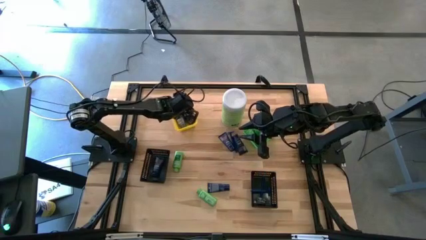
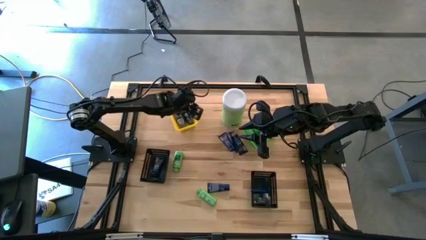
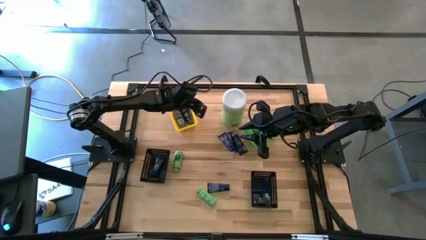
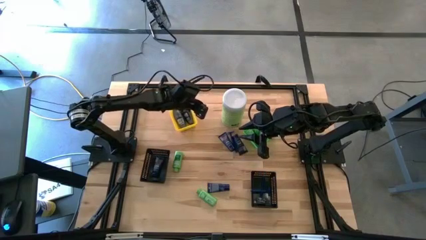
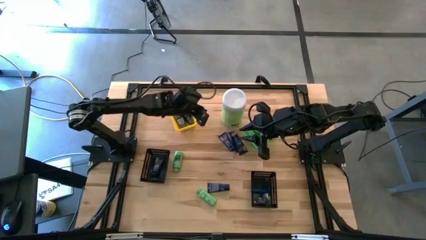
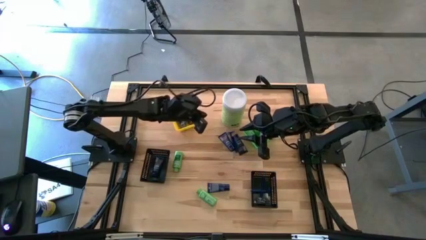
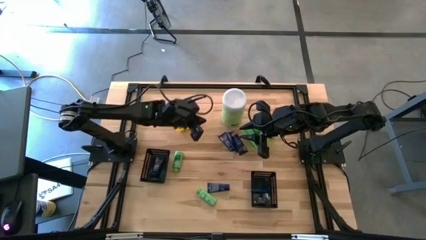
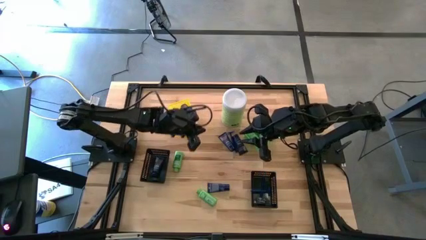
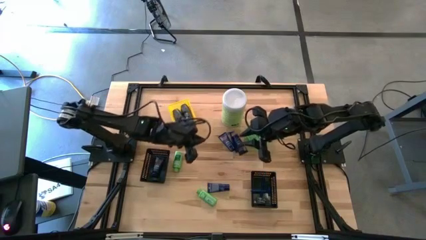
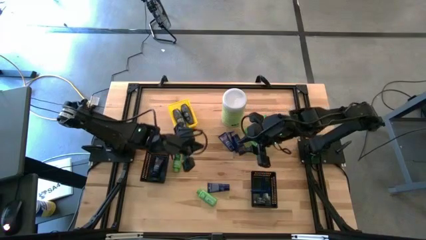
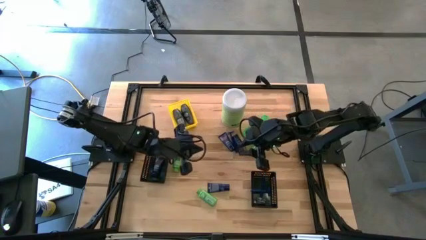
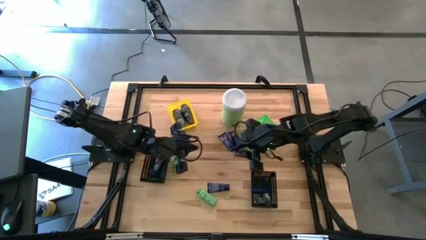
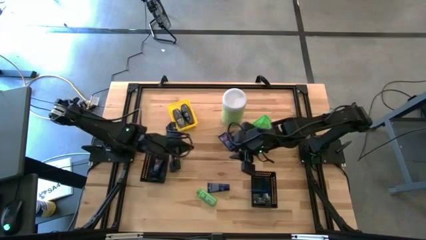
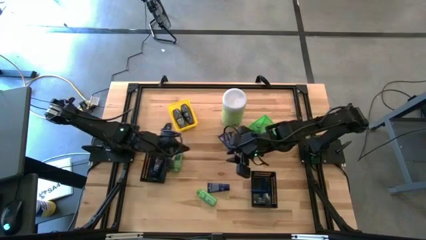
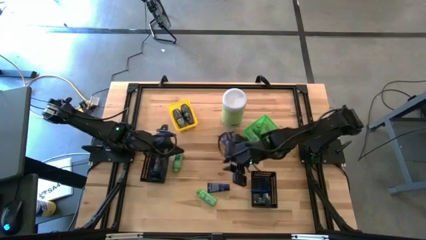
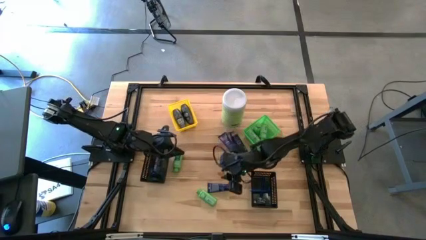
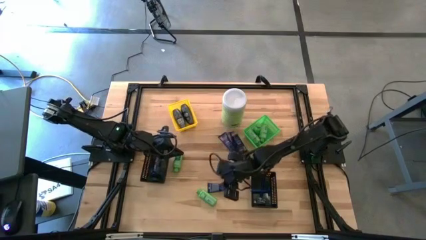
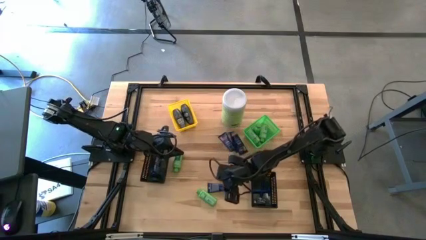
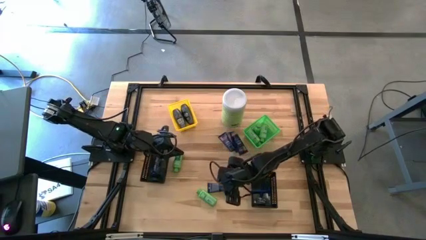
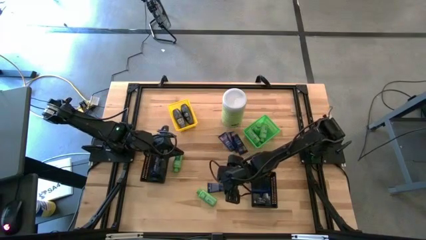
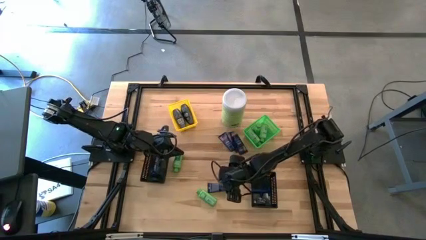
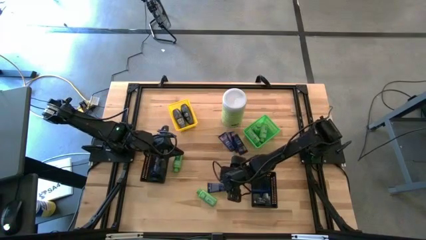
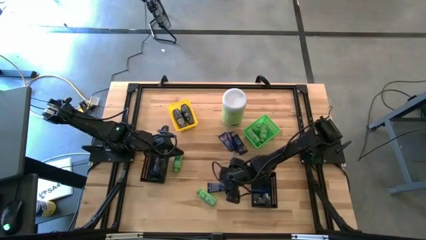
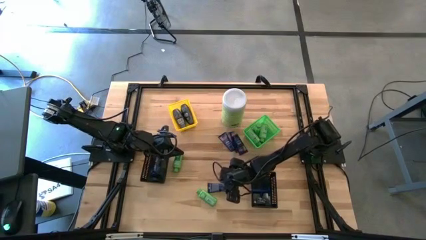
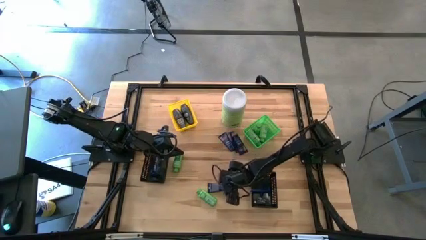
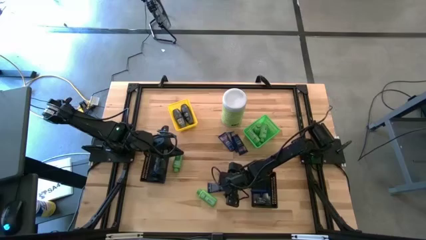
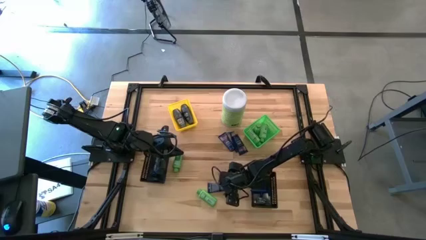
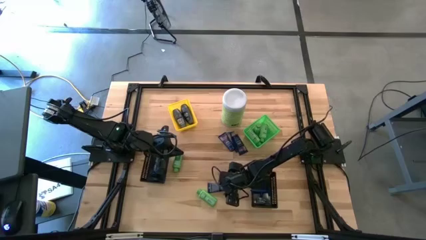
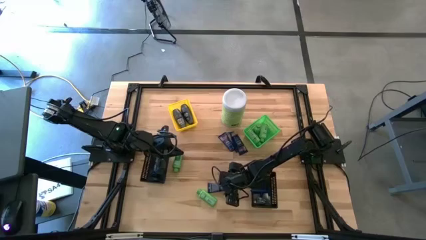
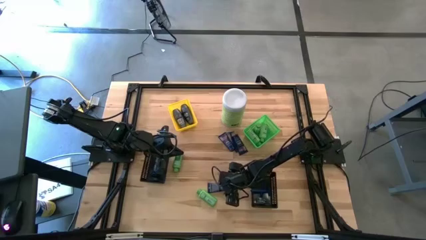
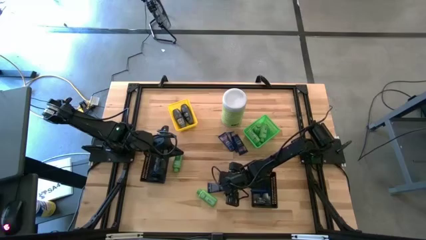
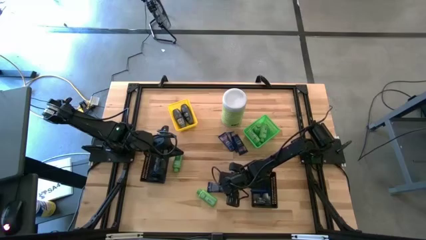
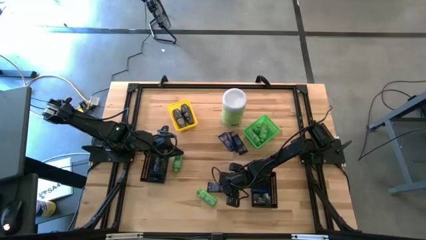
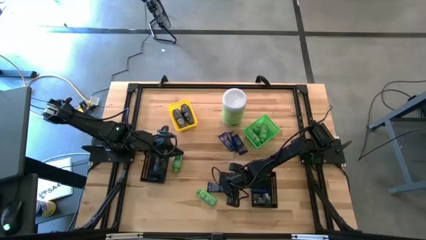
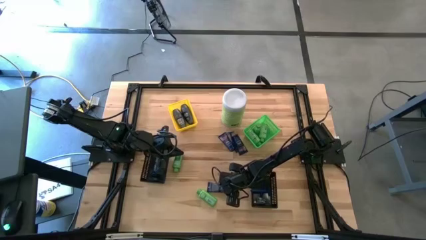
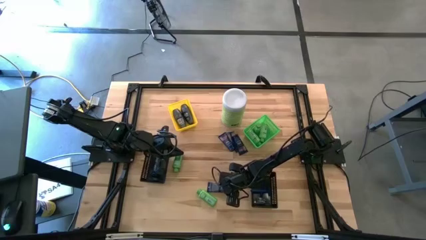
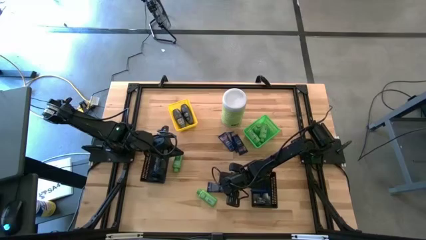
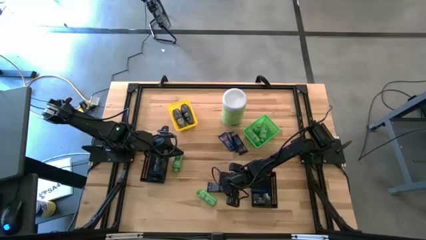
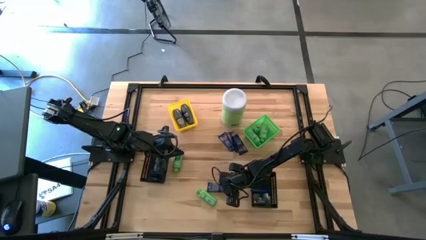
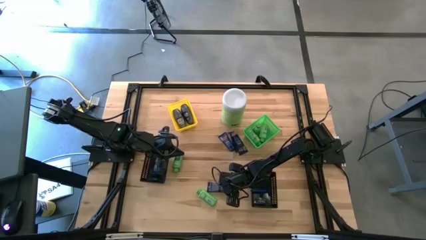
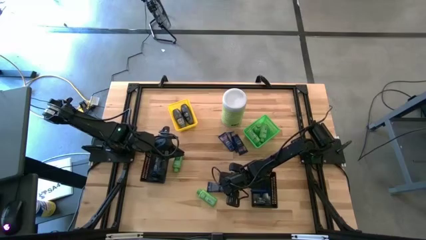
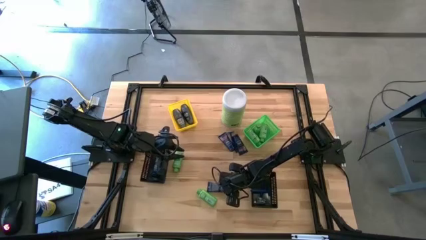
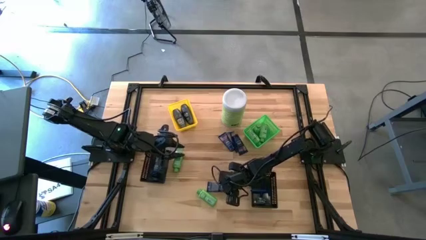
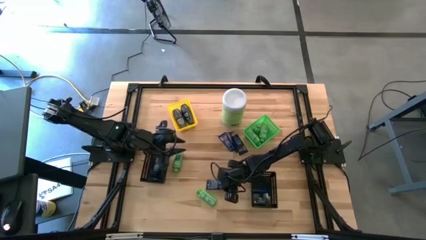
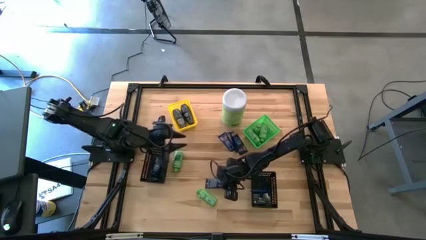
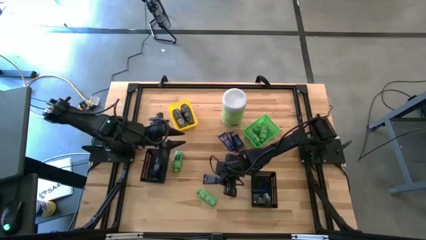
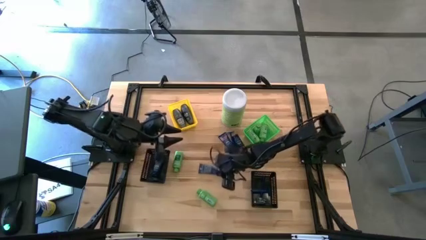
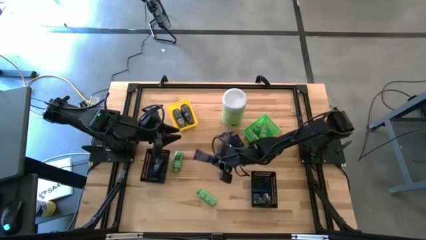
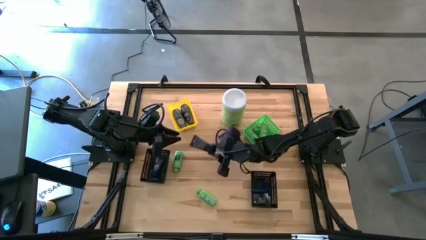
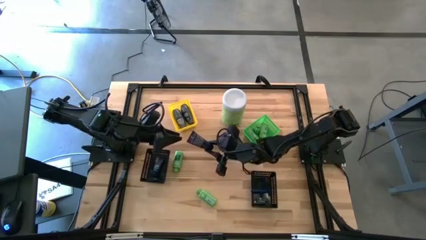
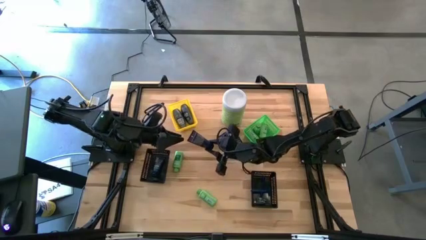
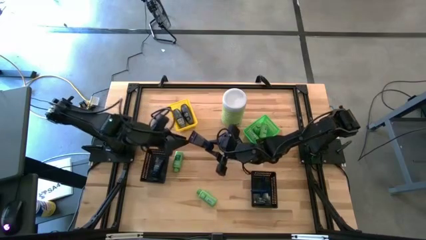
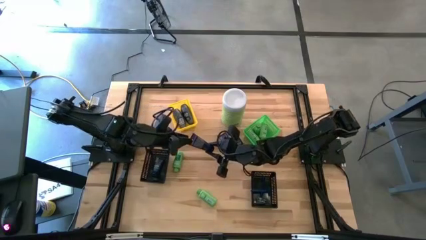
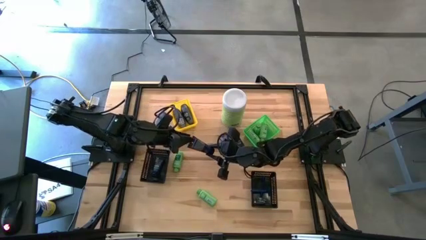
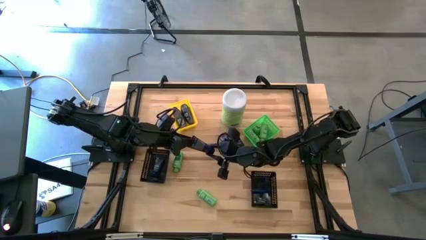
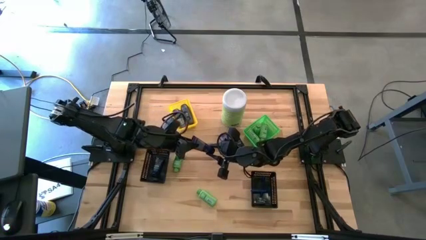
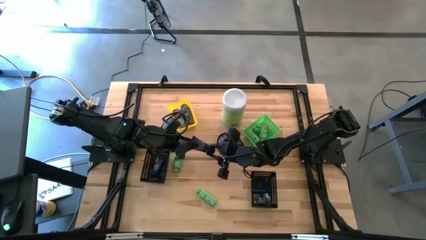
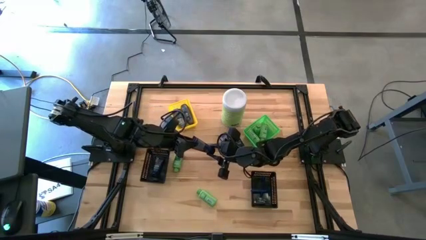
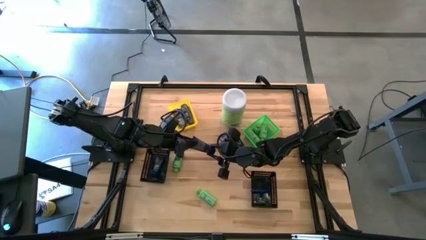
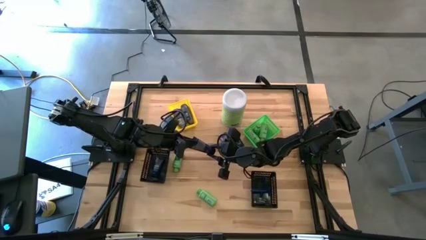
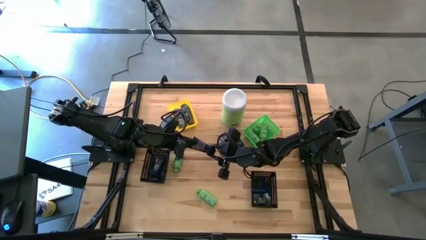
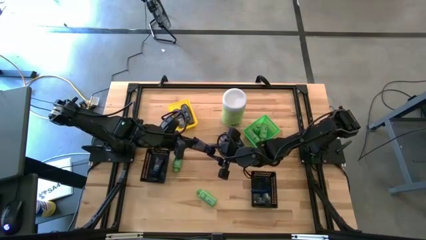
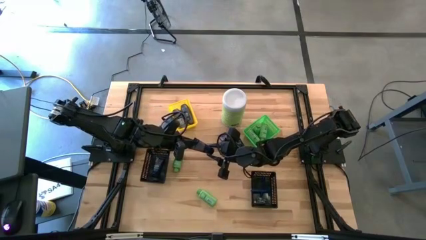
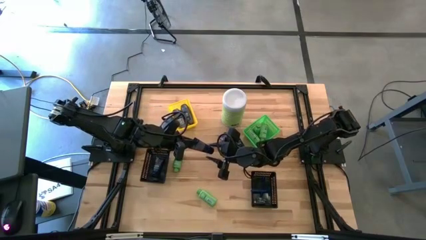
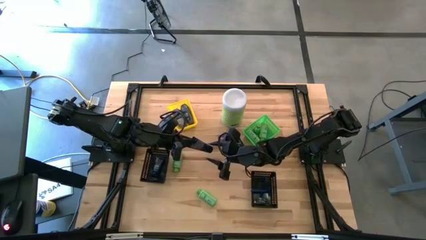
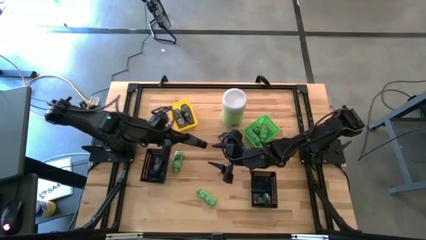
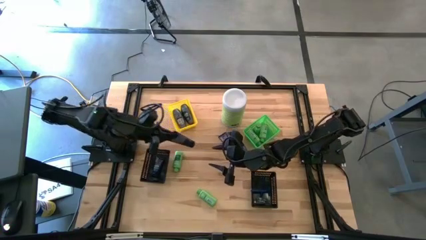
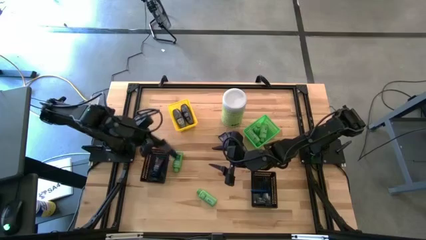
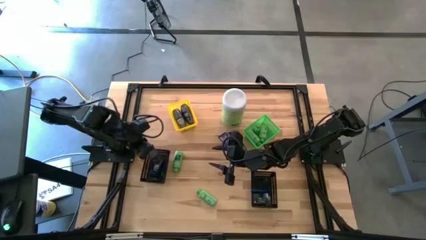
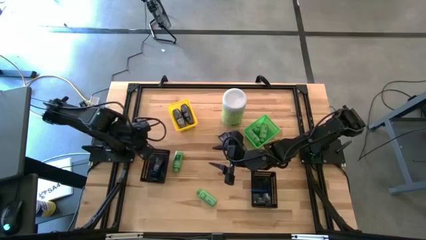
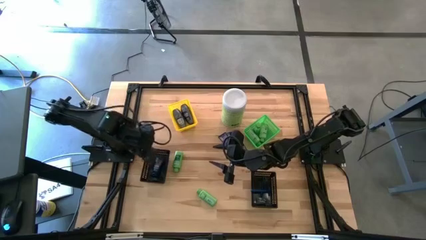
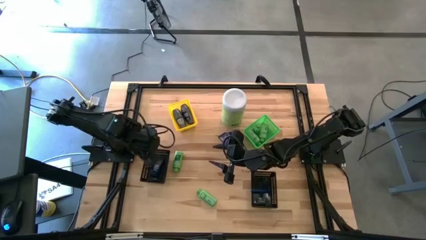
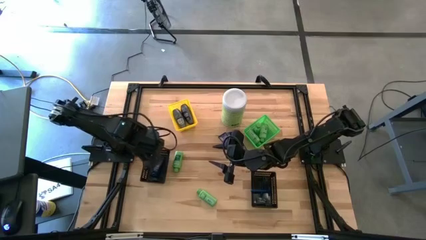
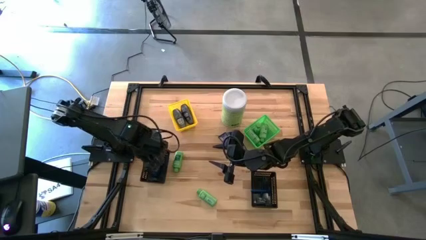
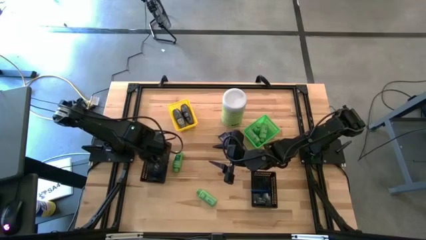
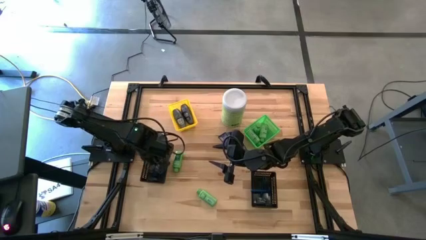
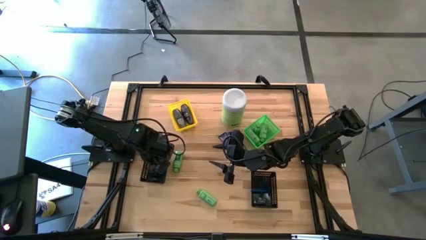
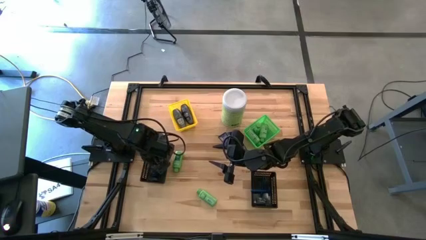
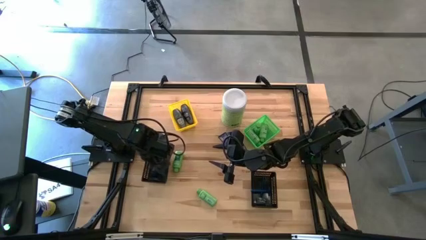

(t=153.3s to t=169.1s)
Task: Pick & Place Travel size toiletries
Put the shave cream into the left black bin

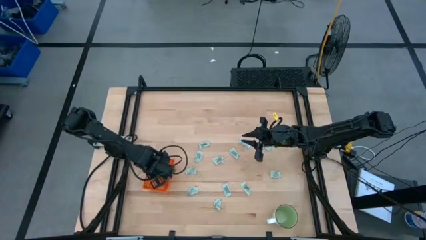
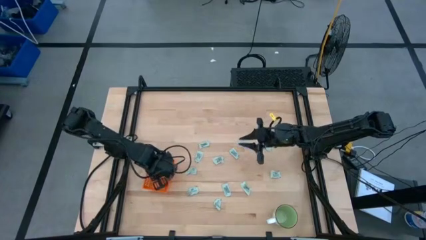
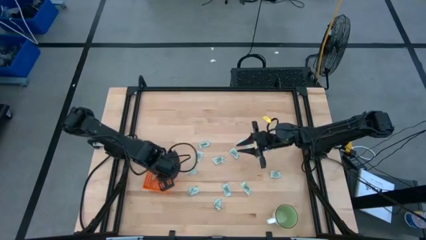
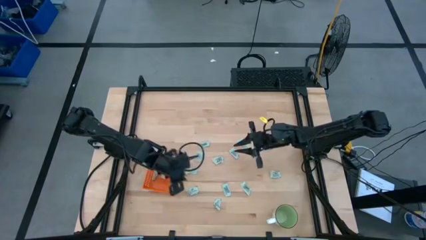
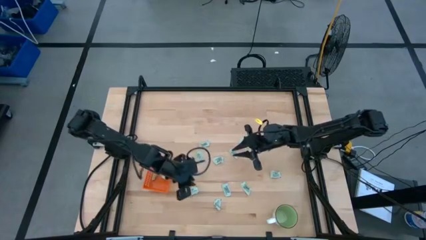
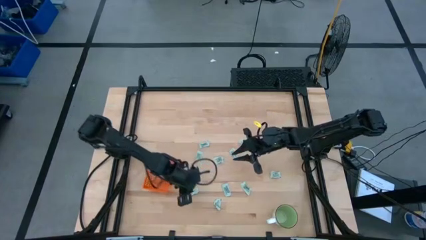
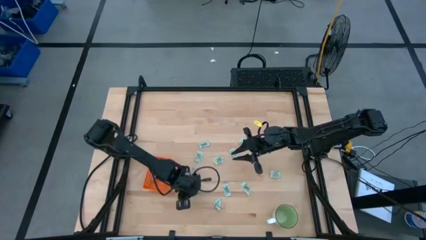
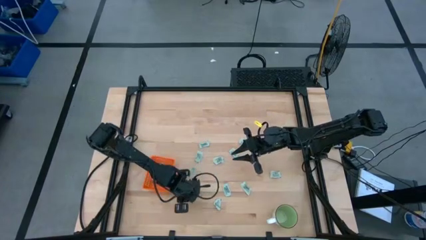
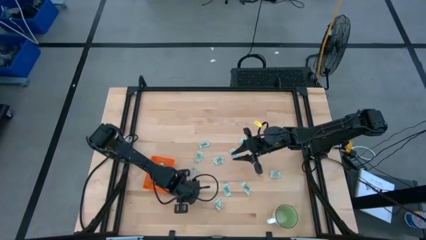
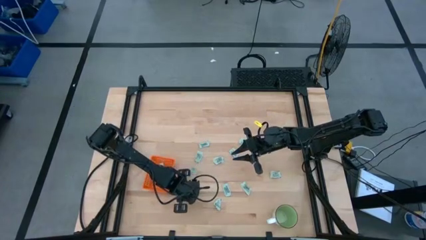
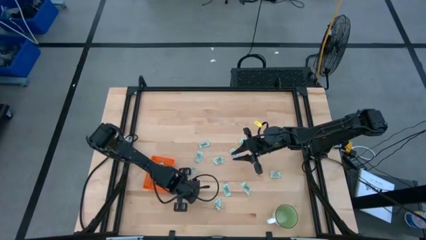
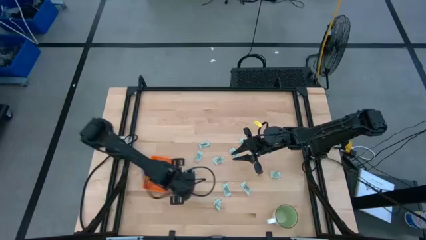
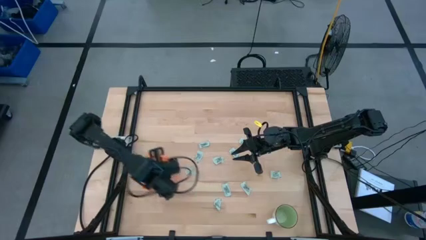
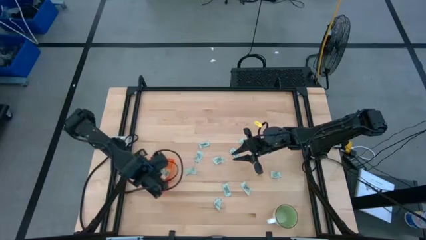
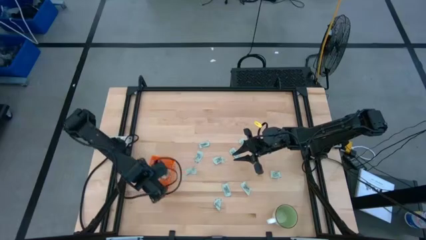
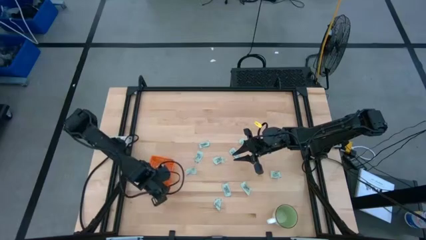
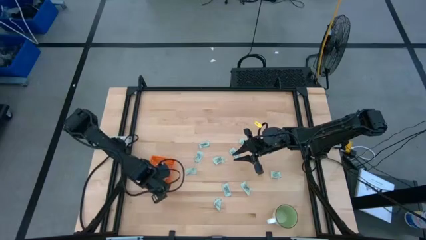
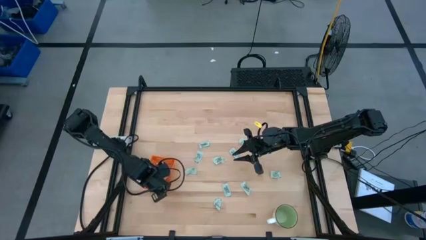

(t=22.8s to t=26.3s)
Task: Pick and place Stevia / Truvia into bins
Put the white stevia packet into the orange bin
